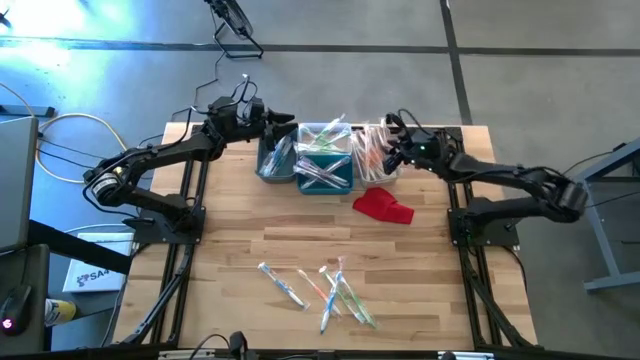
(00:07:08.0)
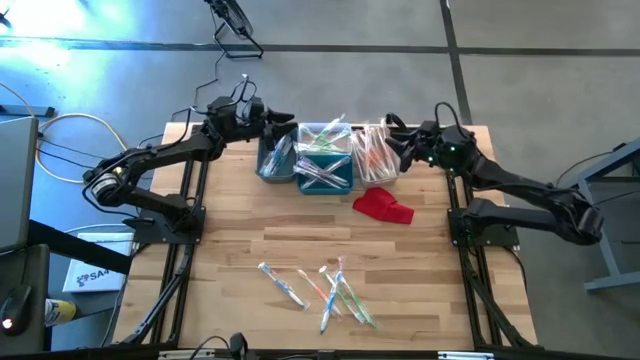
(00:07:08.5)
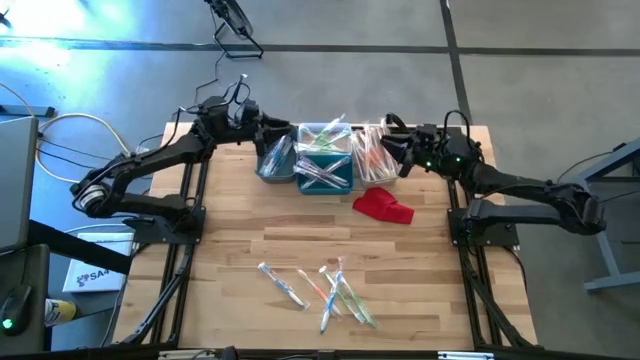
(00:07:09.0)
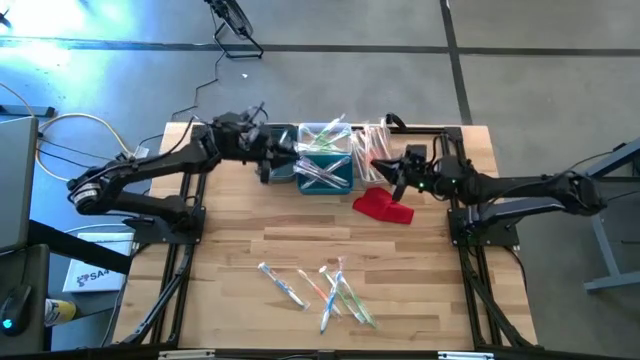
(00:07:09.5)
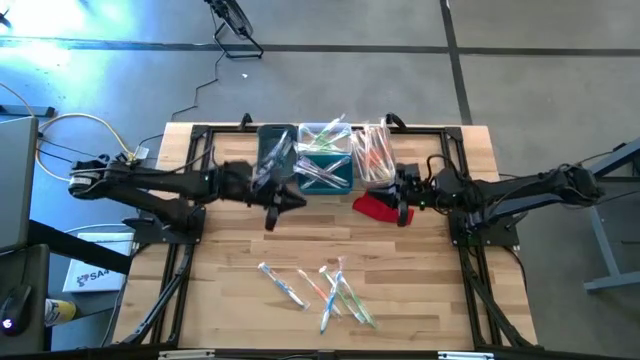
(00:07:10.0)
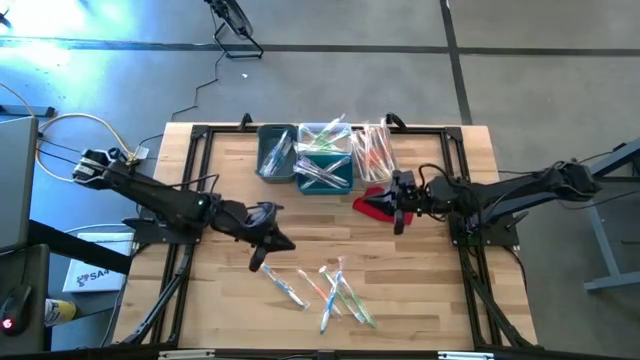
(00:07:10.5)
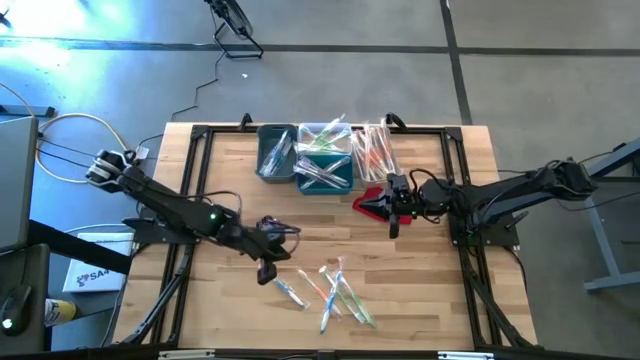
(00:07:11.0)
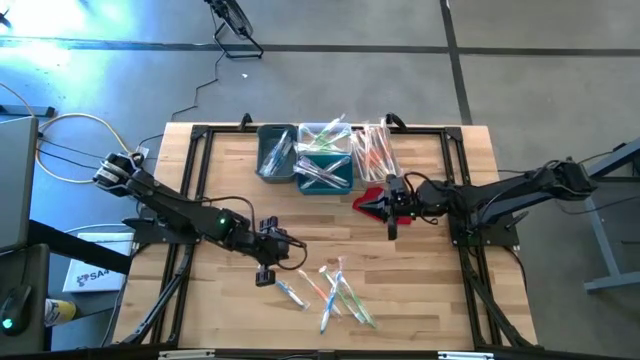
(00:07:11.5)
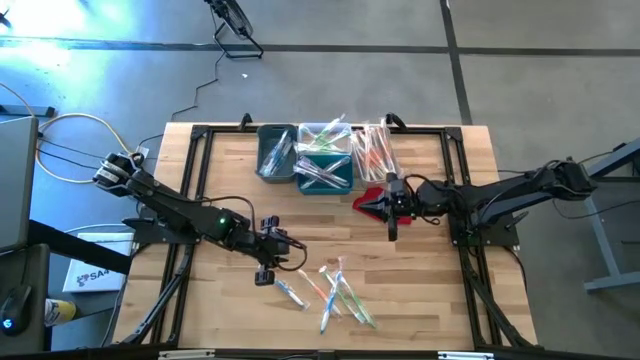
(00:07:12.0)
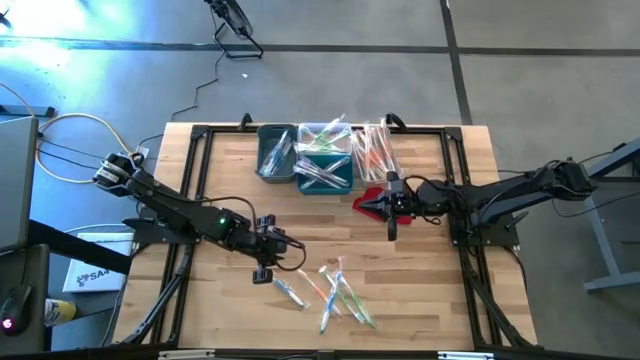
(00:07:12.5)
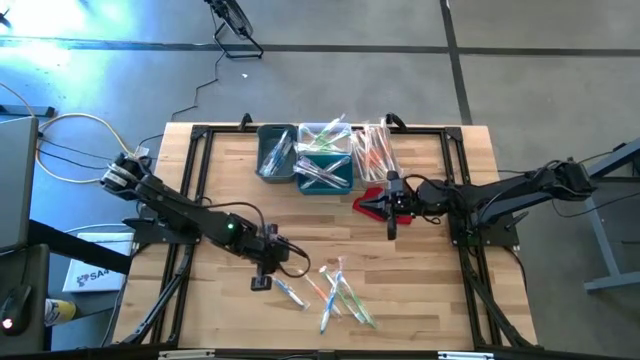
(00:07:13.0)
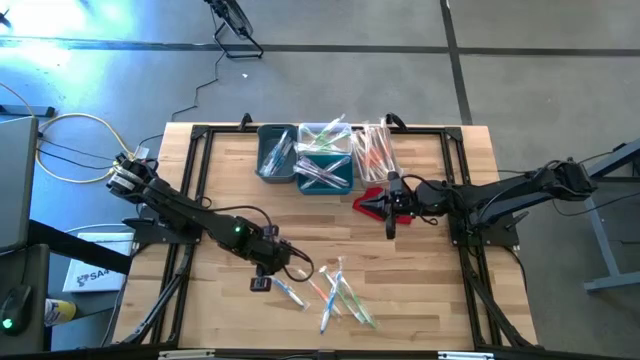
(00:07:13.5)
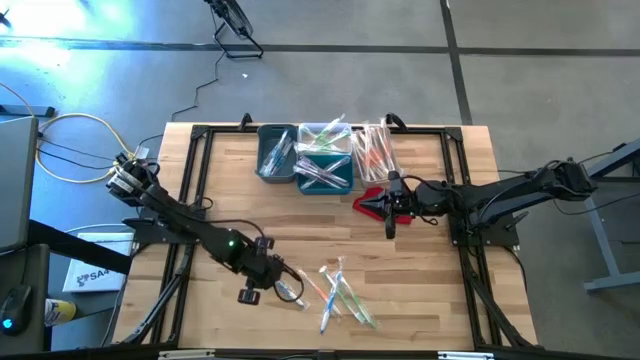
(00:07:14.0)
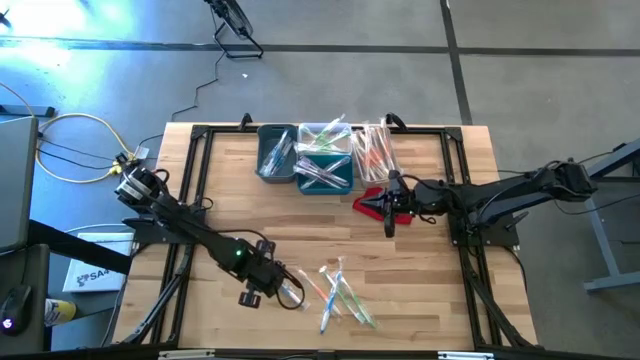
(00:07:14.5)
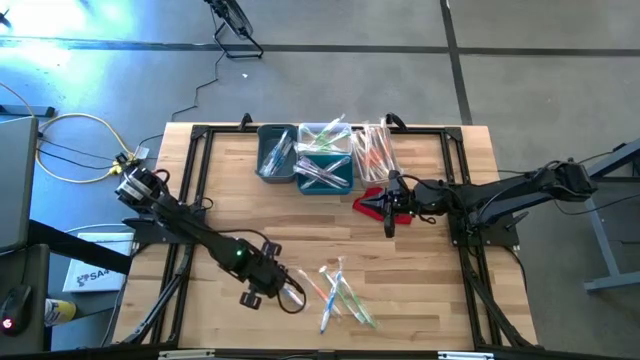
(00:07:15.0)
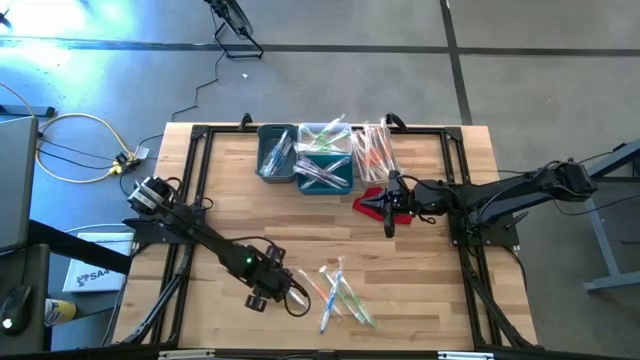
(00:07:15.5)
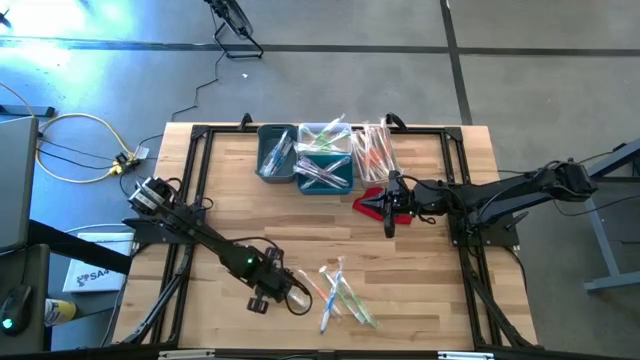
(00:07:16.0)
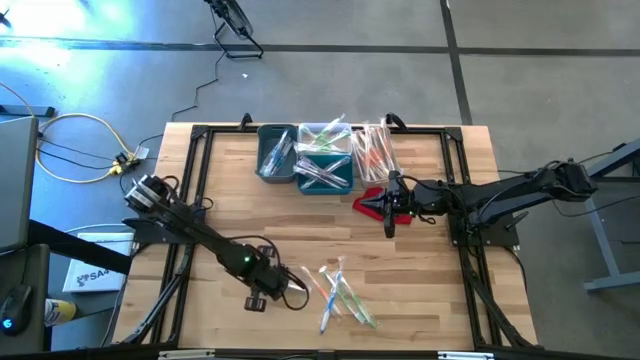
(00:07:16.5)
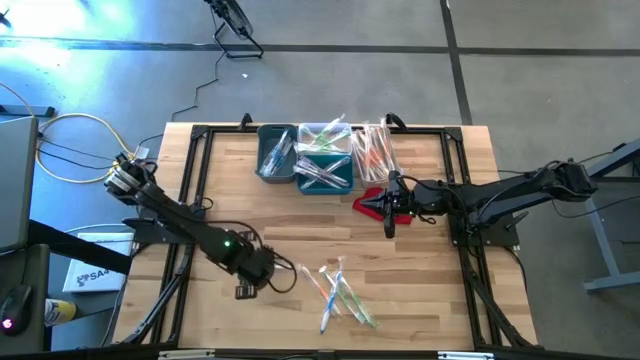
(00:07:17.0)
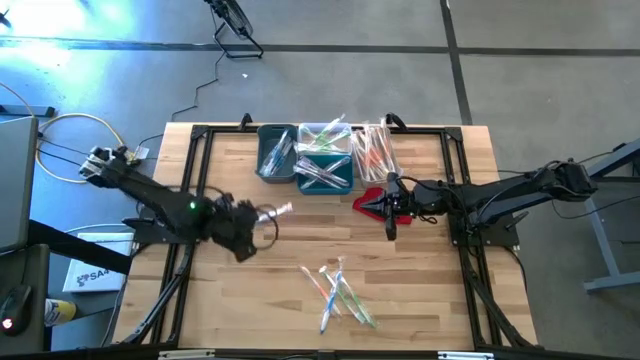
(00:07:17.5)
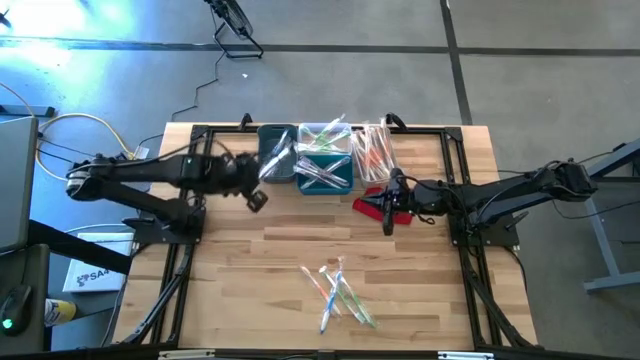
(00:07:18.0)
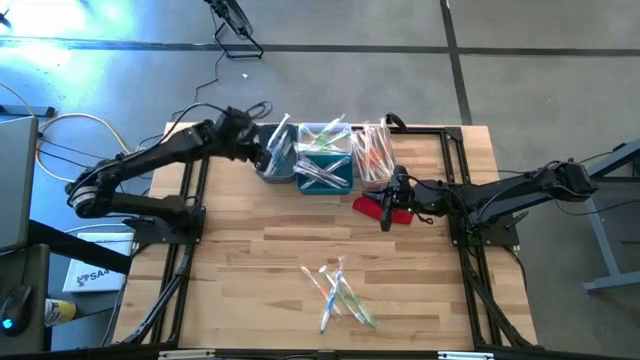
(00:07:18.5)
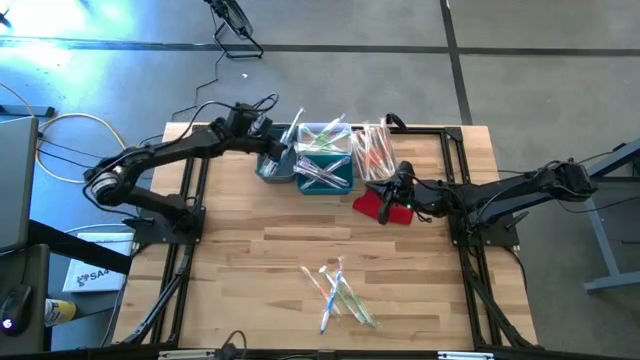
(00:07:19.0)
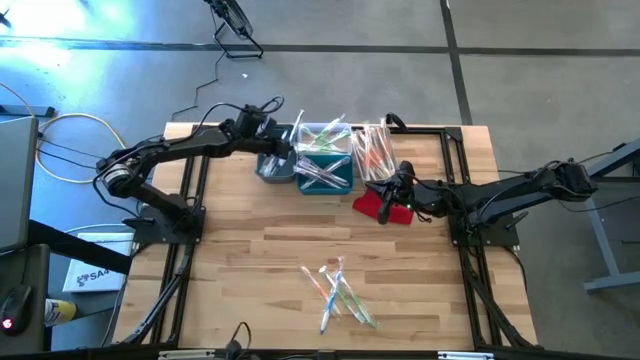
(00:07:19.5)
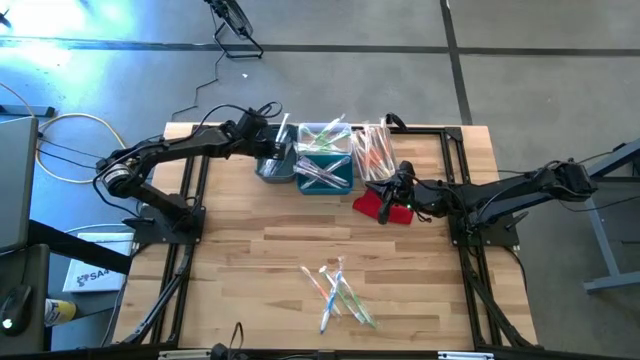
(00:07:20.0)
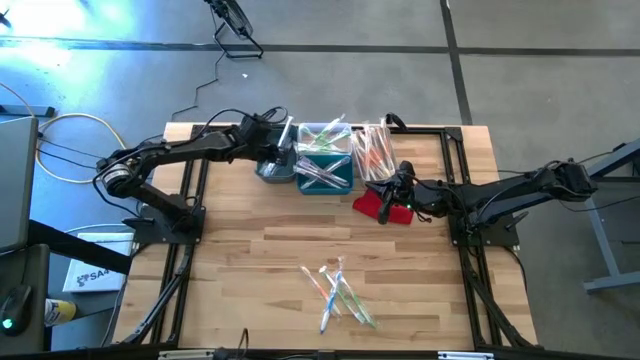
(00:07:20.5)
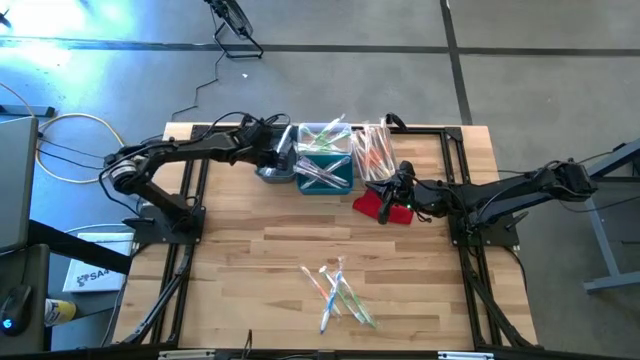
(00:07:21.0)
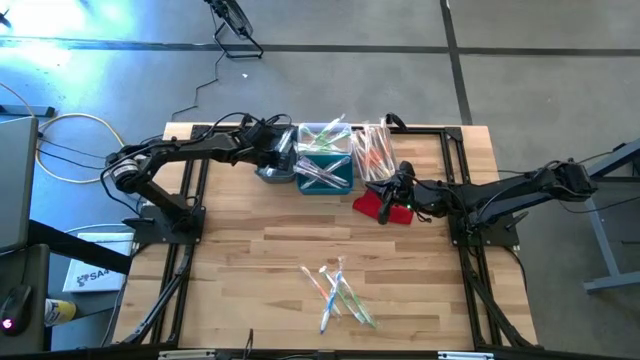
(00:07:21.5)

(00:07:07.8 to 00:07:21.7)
Task: Pick & Place Toothbrushes
Put the left blue toothbrush into the gray bin

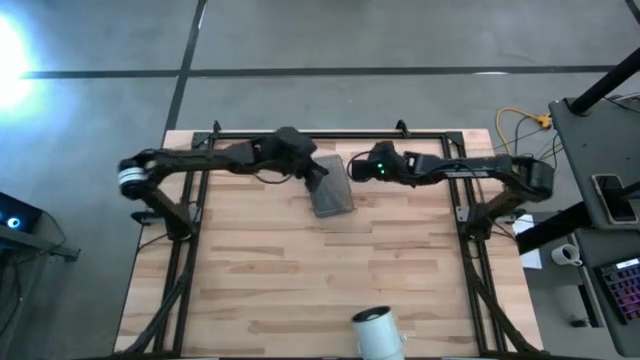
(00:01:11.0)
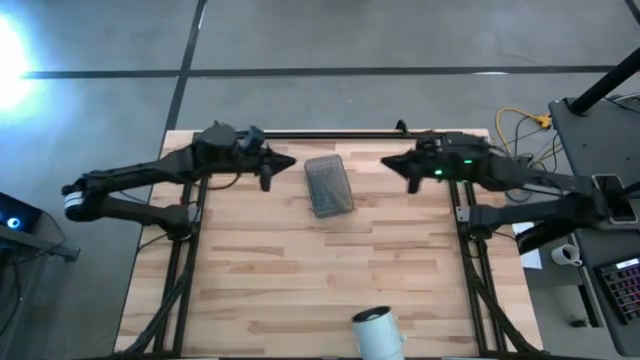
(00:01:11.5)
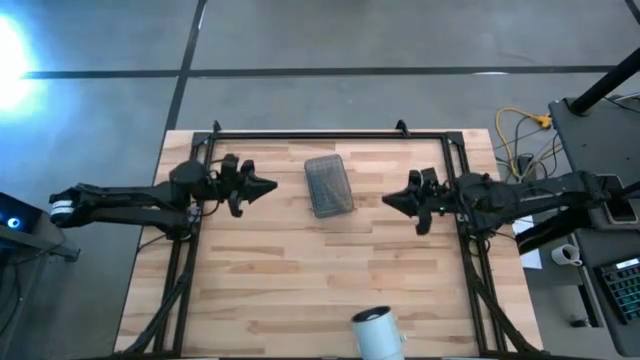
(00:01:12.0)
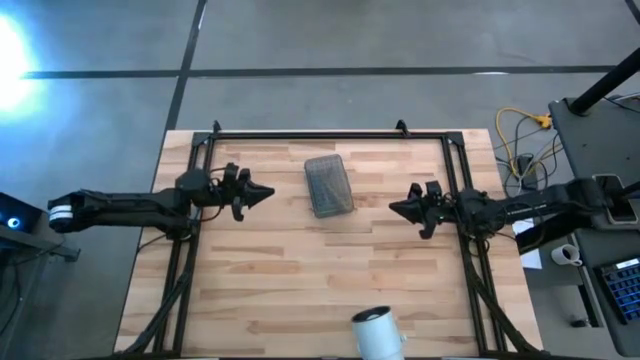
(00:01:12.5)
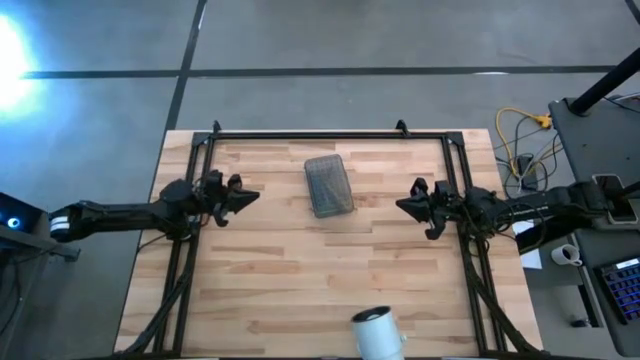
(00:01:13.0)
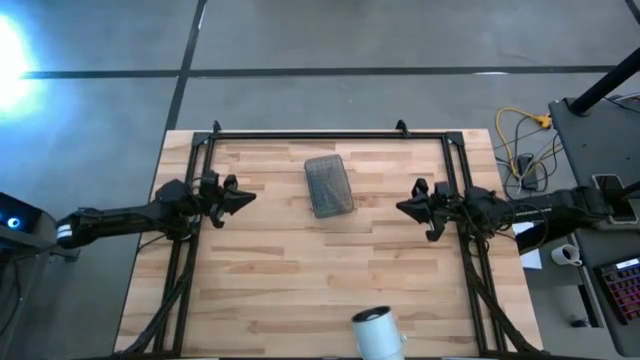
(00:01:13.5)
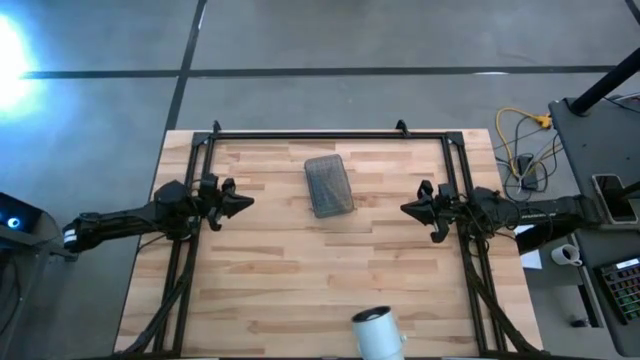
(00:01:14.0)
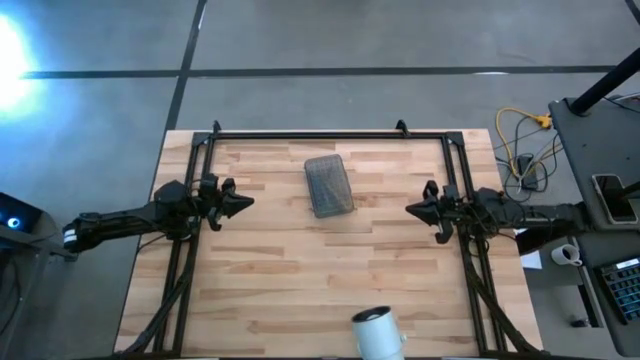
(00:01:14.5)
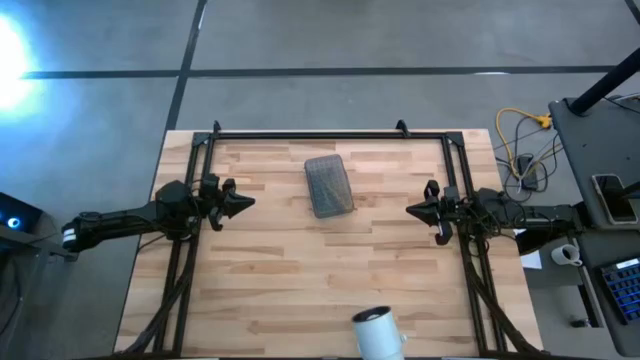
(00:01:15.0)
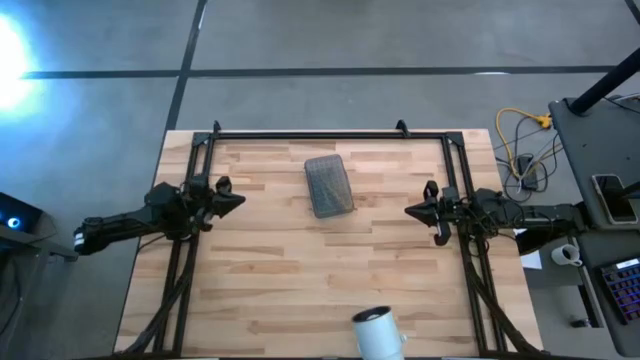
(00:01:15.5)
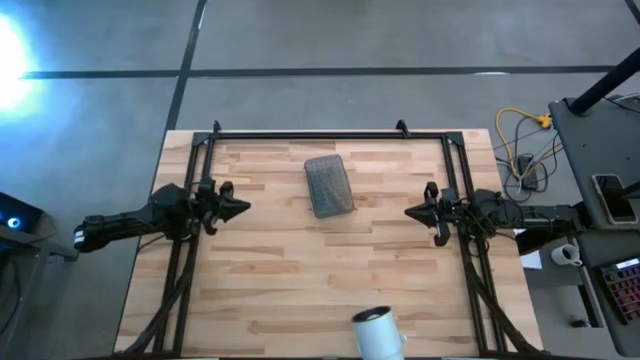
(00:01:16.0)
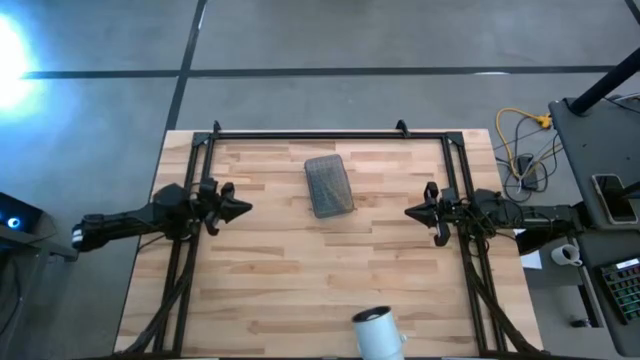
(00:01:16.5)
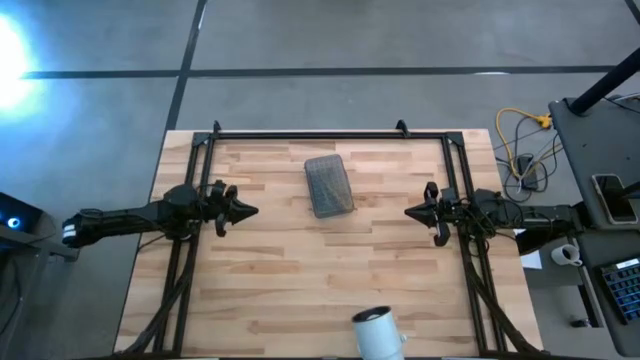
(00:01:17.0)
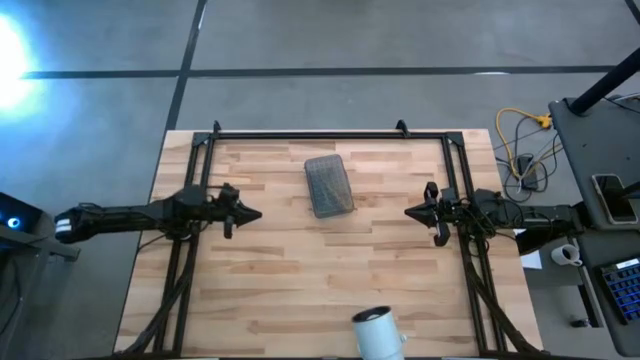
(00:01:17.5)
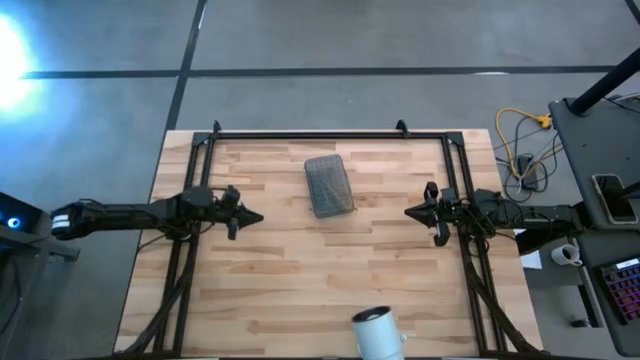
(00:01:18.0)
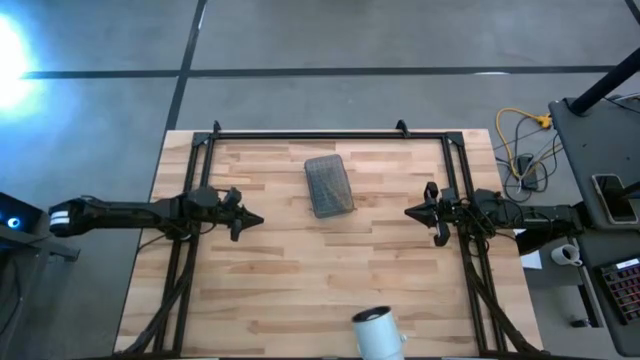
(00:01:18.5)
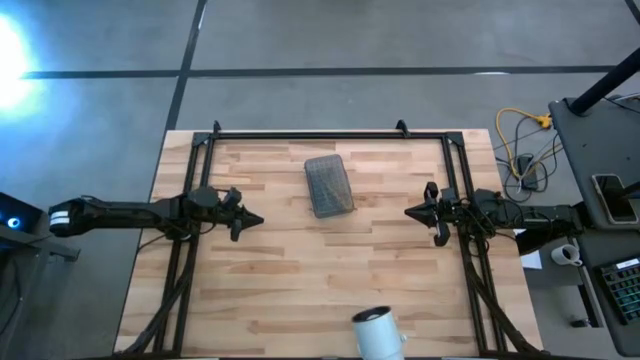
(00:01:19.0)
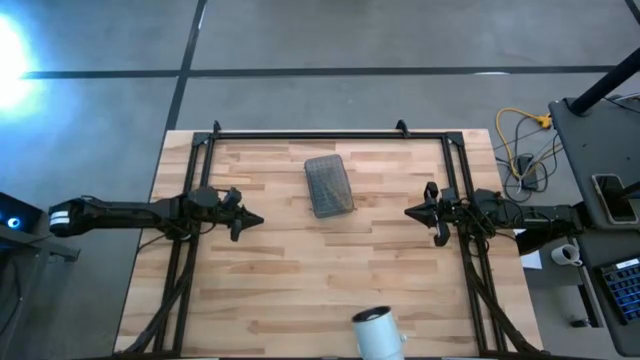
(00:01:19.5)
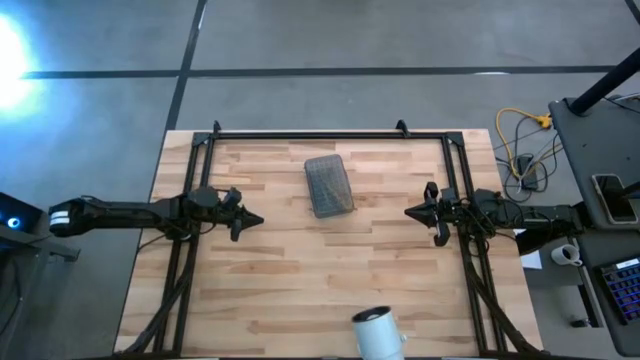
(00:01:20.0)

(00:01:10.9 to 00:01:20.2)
Task: Pick & place school supplies into a supply box
Return to Home Position
